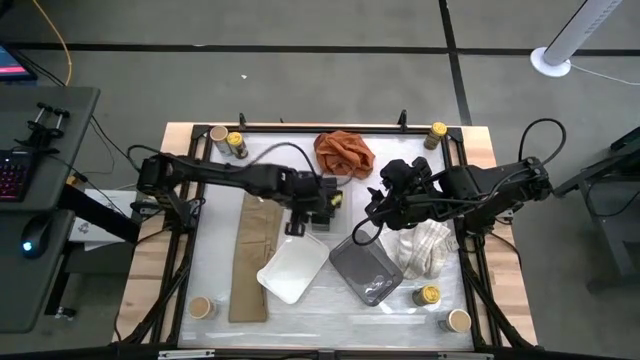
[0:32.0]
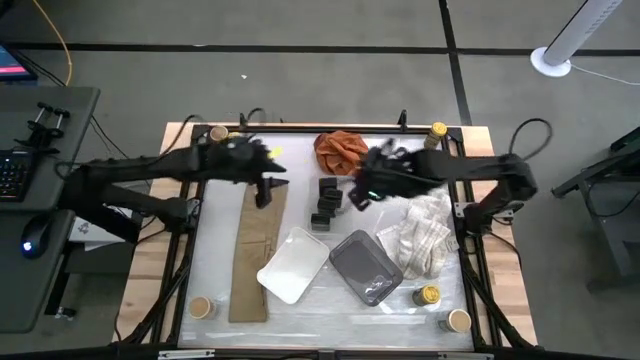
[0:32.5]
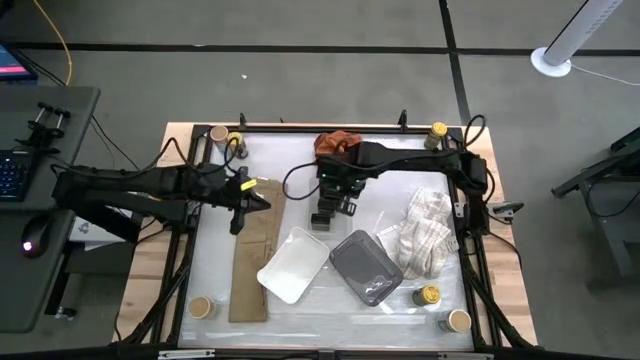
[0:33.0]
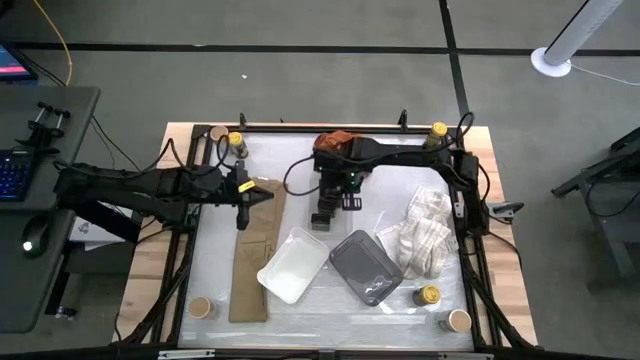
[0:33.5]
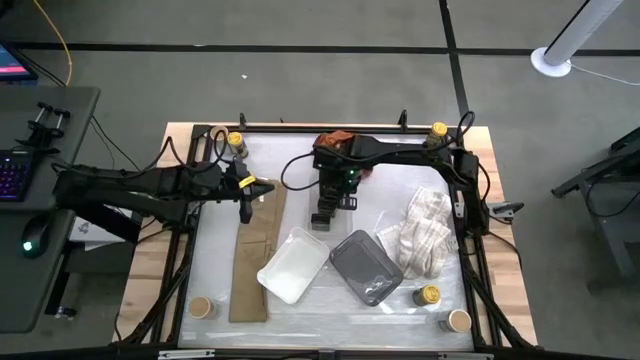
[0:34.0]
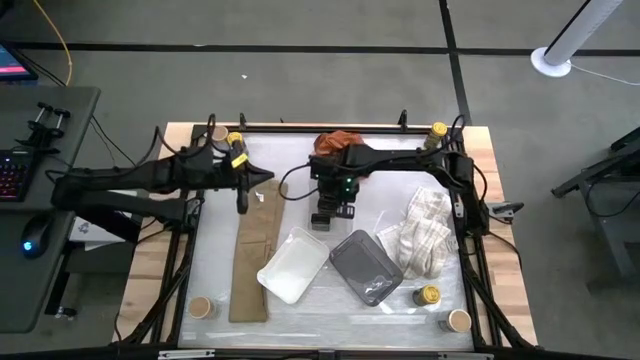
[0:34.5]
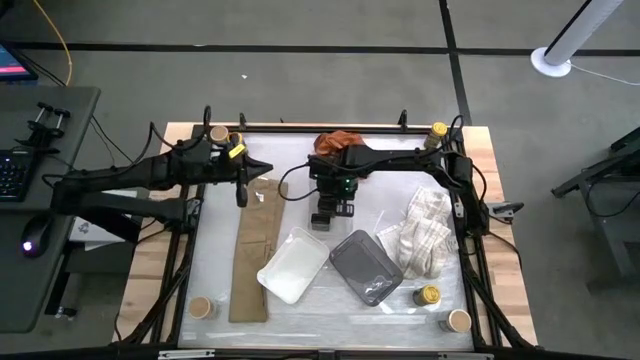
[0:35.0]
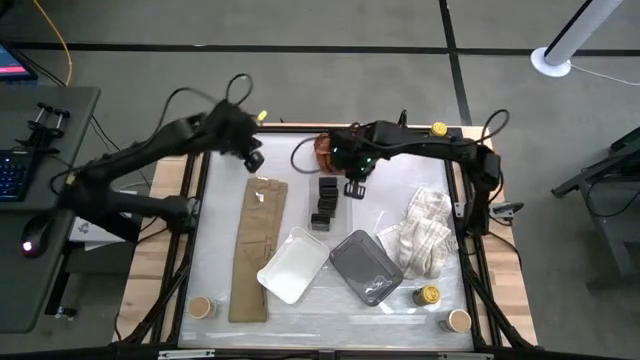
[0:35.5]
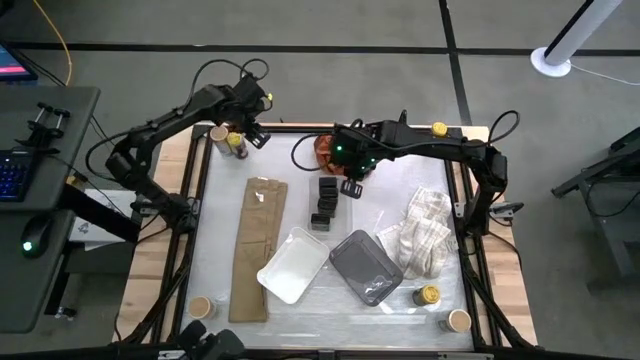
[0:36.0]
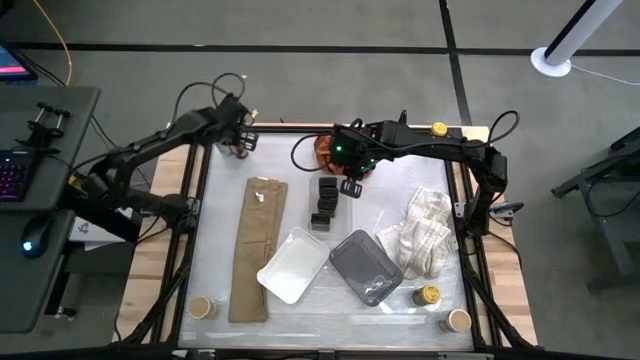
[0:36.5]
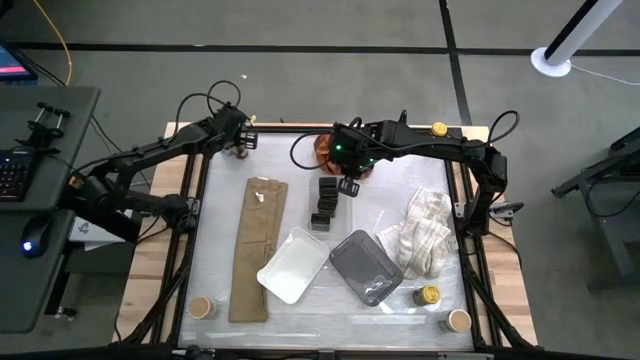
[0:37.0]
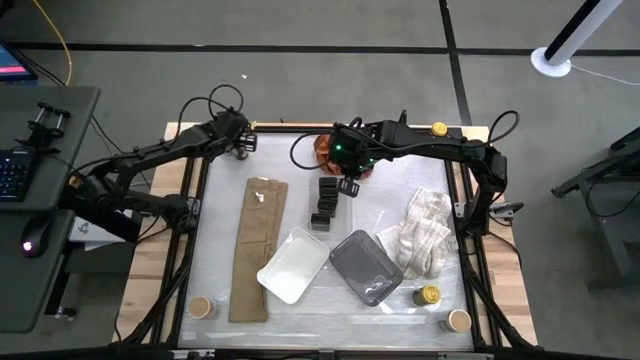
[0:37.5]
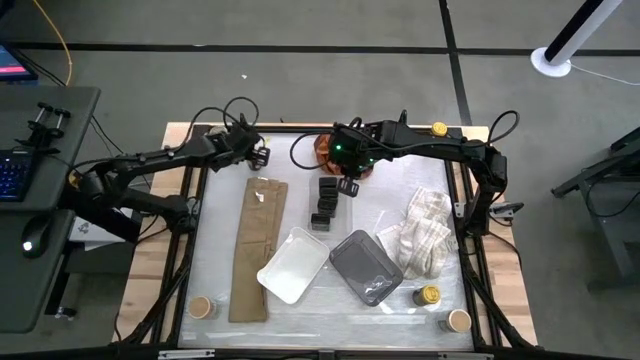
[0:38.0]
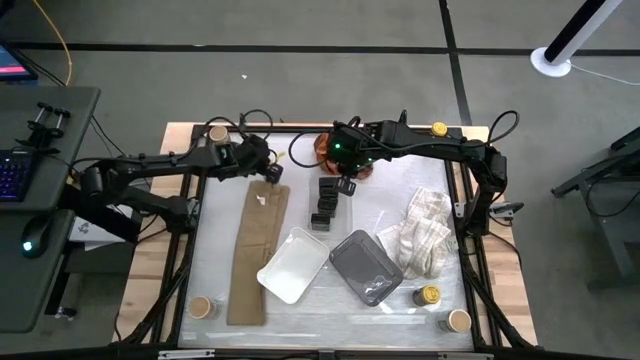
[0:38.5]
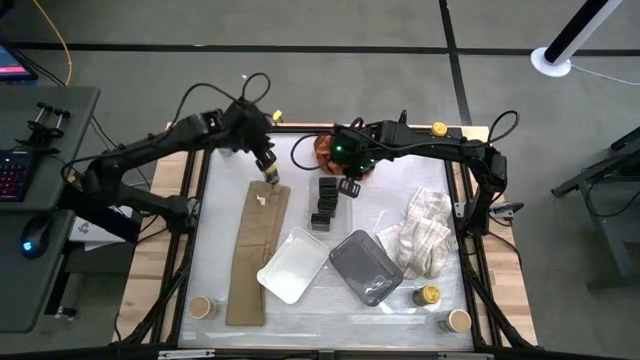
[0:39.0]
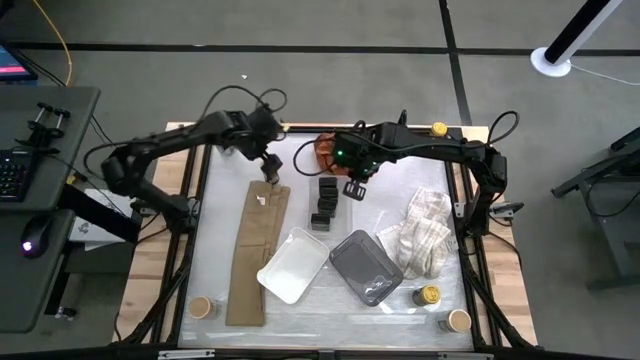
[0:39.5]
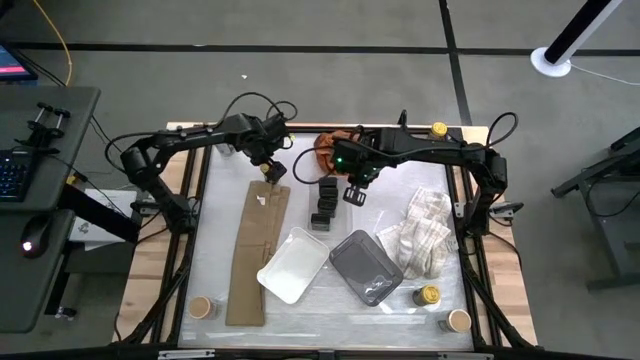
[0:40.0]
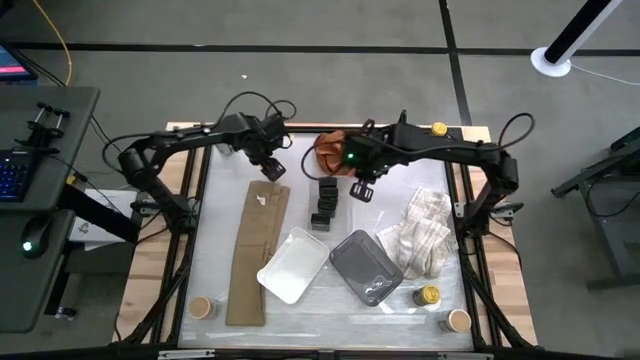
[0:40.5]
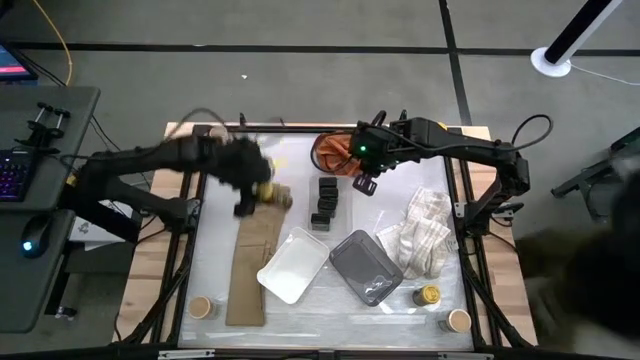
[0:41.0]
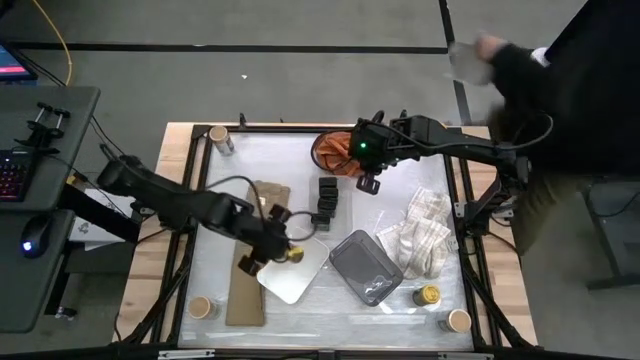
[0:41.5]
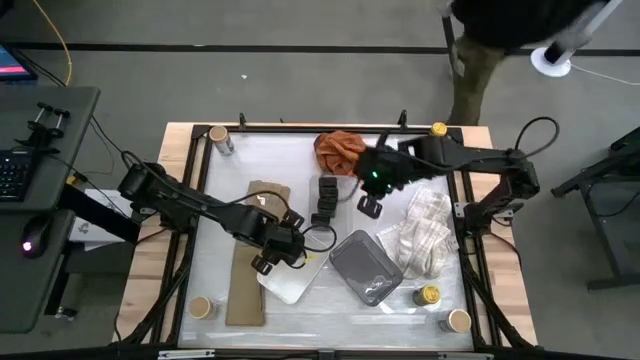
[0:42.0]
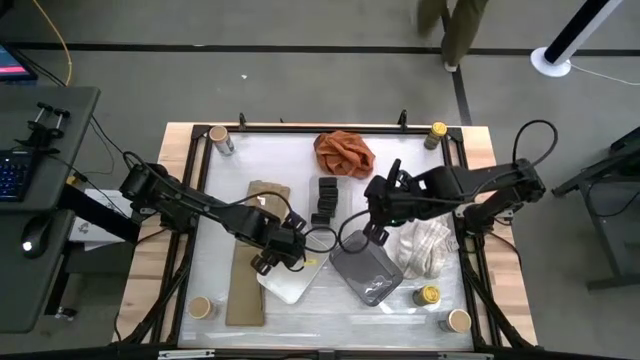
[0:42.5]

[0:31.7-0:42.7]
Task: Sort spices by type
Put the top left yellow seasoning bottle into the white bin

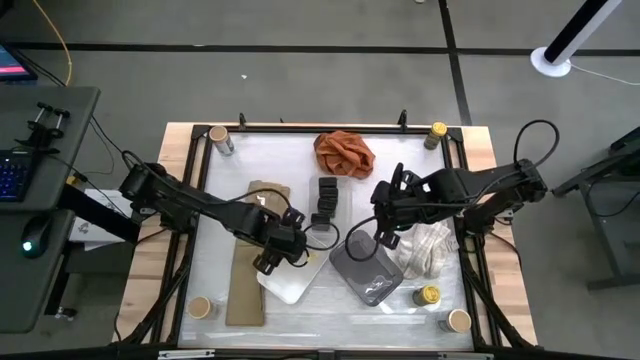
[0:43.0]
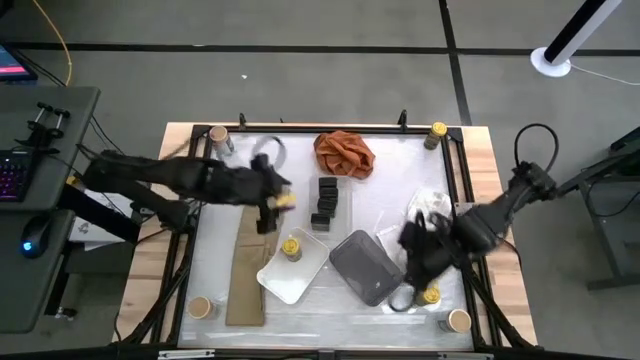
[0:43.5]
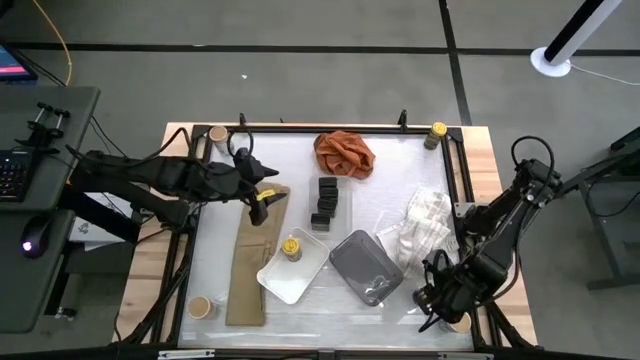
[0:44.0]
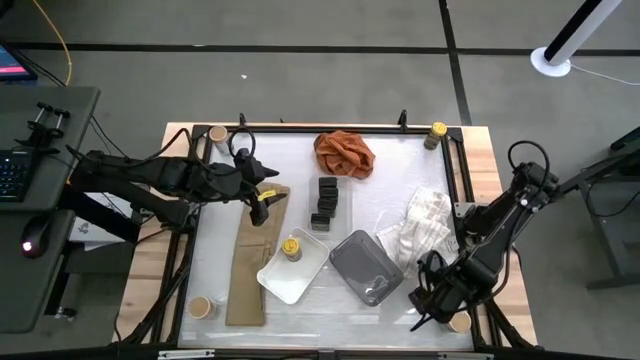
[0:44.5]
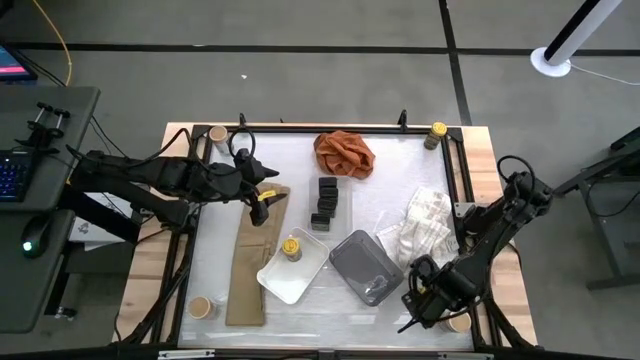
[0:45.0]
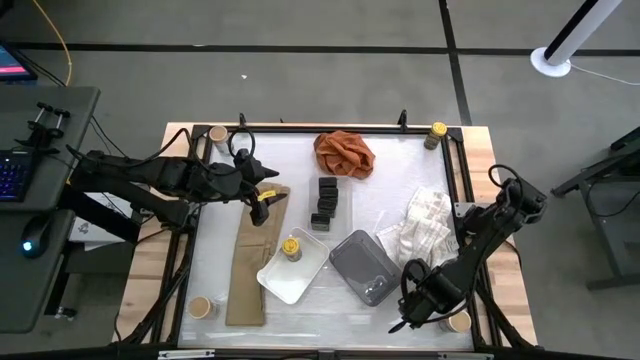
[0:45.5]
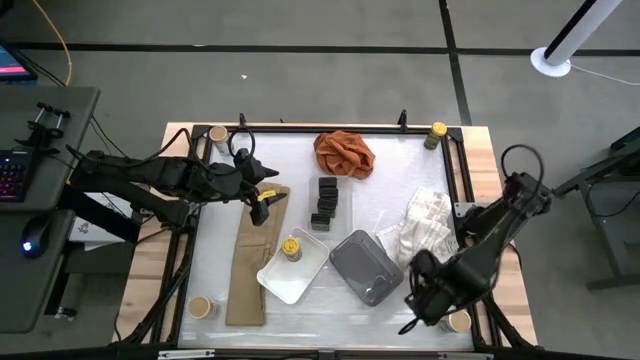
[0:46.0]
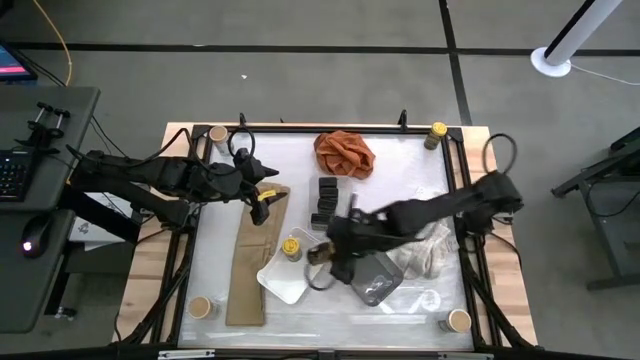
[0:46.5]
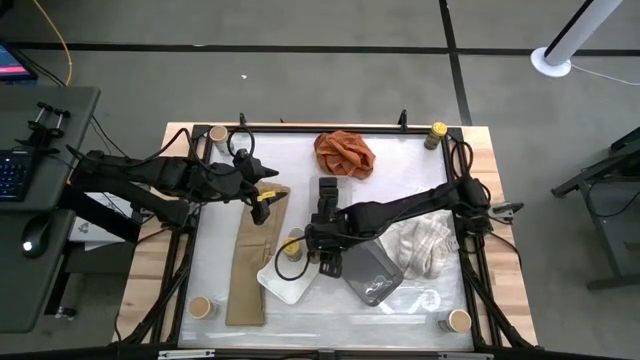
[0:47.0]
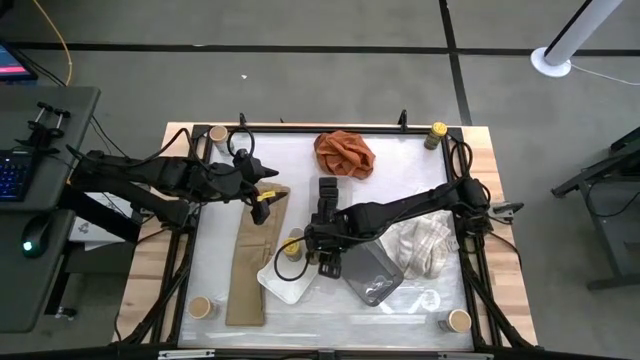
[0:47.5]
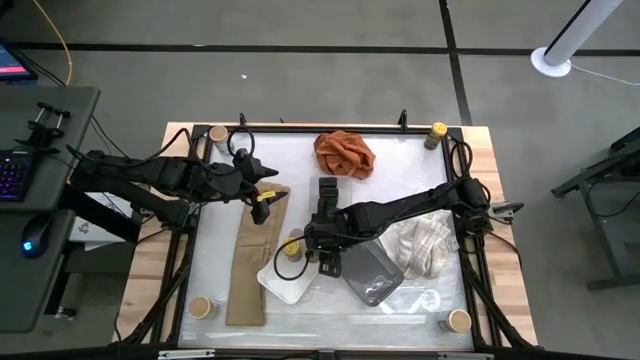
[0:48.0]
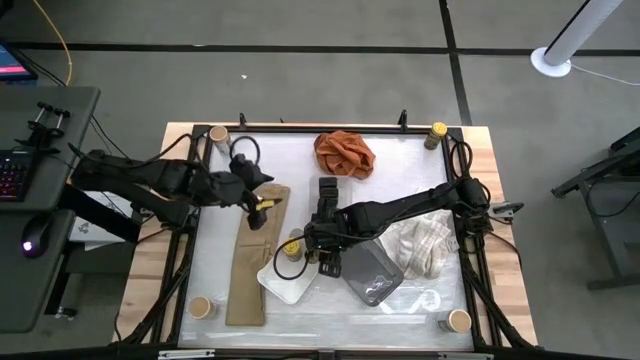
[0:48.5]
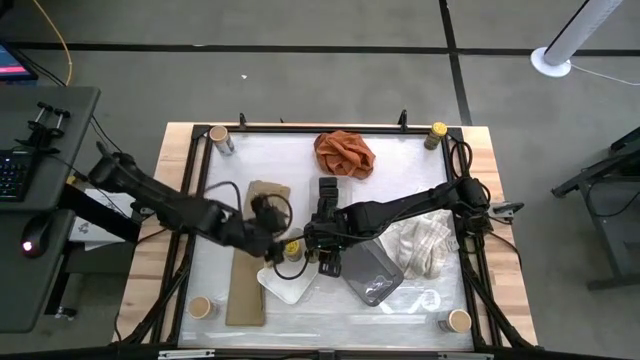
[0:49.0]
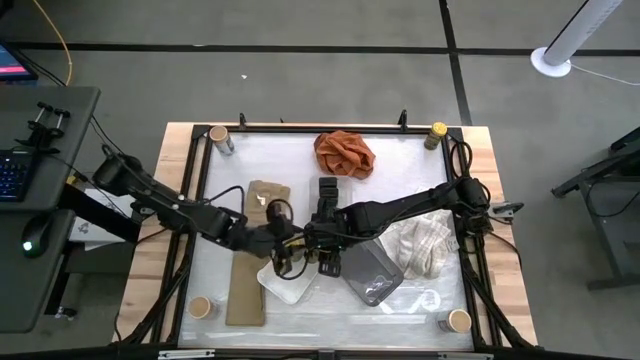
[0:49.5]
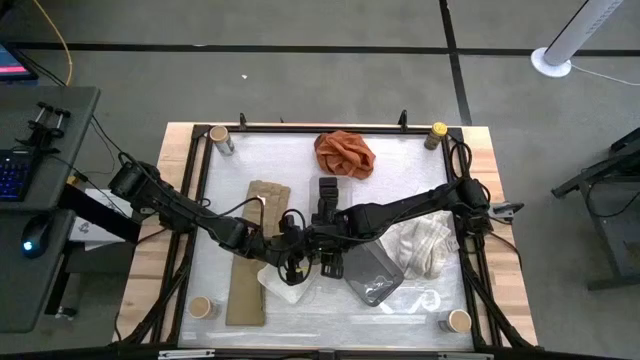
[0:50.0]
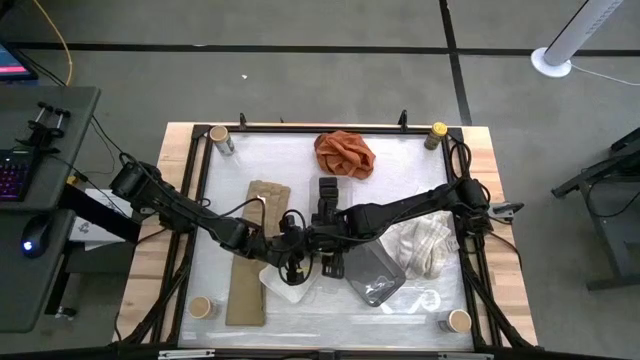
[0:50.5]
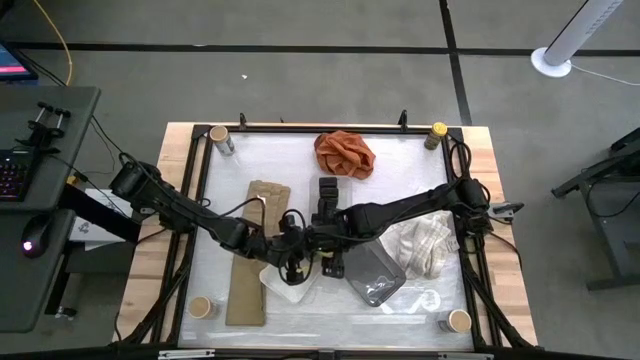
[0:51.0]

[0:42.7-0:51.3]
Put the bottom yellow seasoning bottle into the white bin

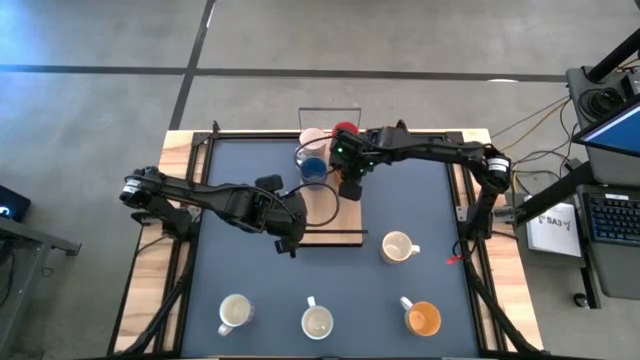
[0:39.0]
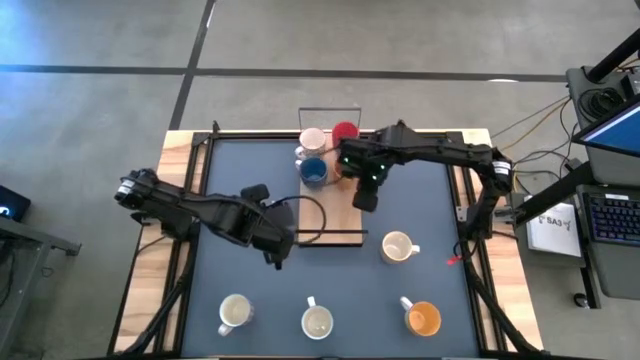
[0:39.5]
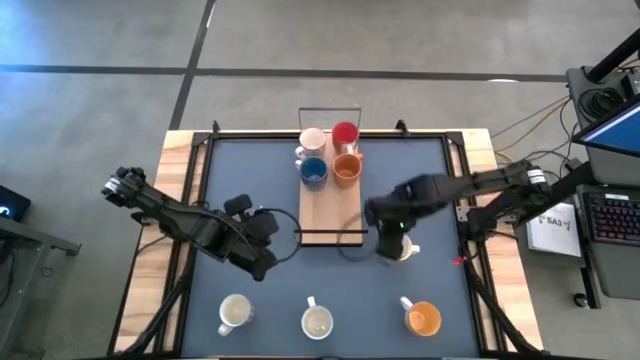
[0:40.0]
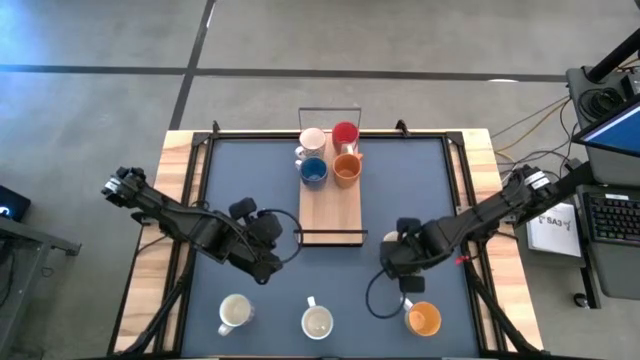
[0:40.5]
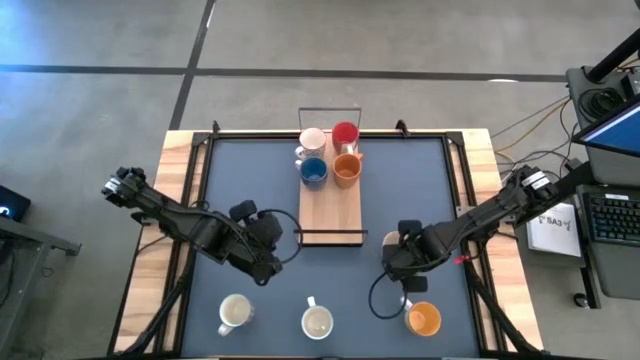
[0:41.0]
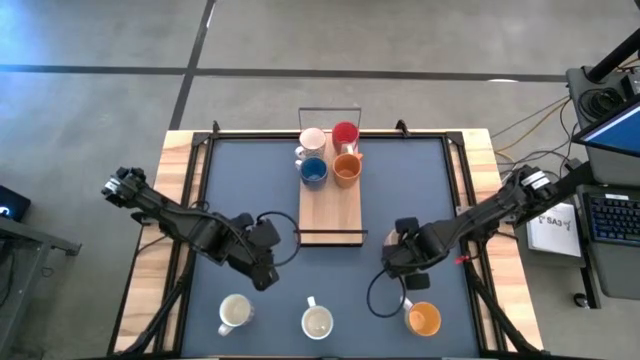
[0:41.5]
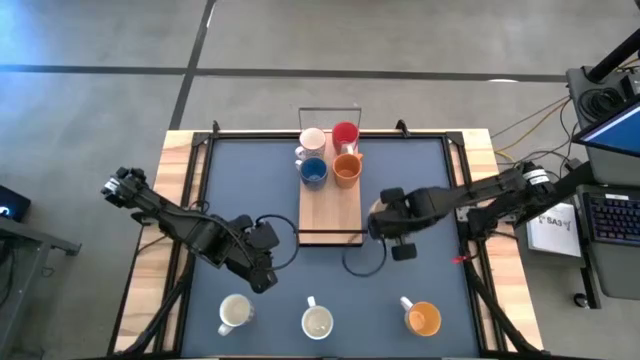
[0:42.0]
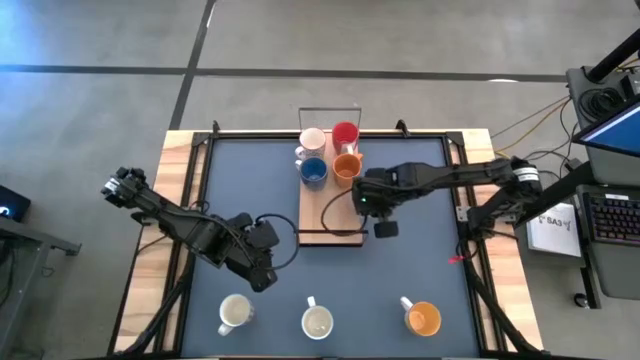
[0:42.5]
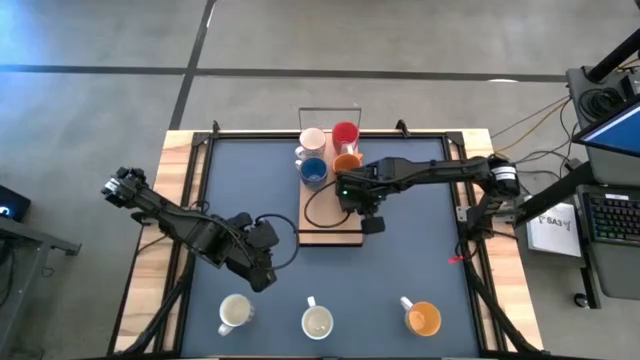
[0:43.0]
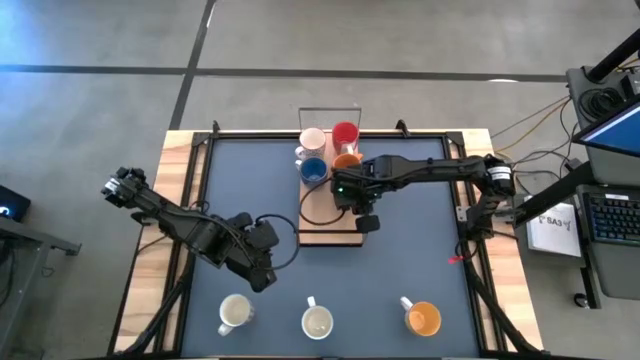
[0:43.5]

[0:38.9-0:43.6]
Task: Place coffee mugs
Put the orange patterned mug on the shelf
